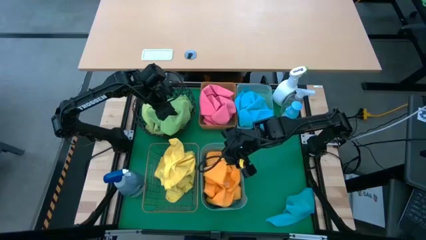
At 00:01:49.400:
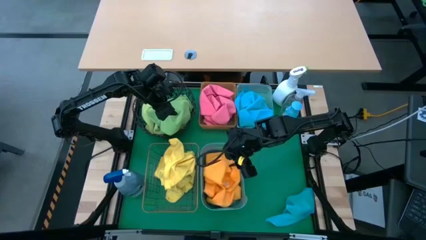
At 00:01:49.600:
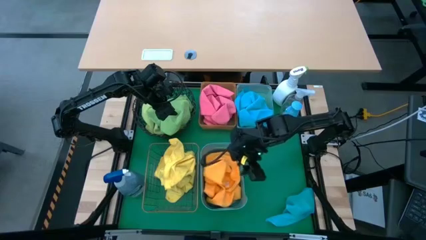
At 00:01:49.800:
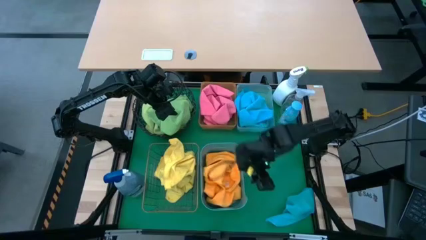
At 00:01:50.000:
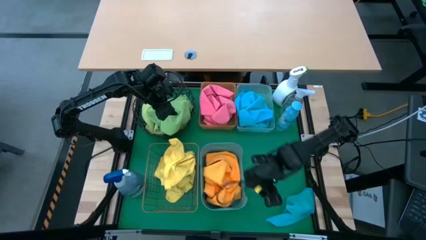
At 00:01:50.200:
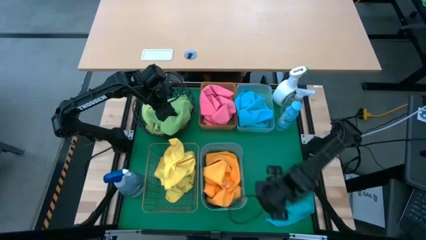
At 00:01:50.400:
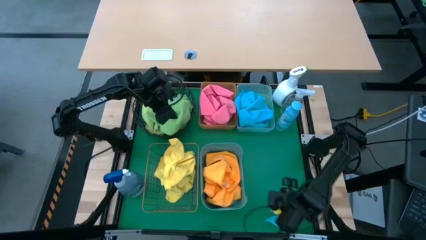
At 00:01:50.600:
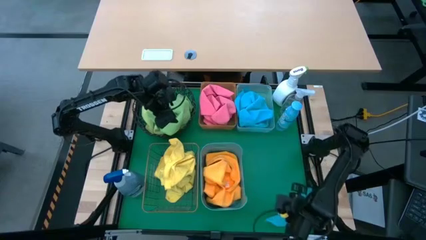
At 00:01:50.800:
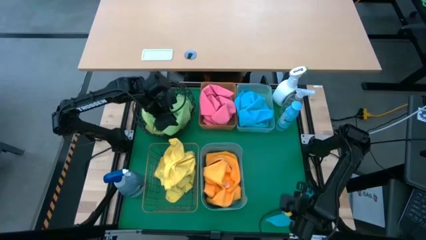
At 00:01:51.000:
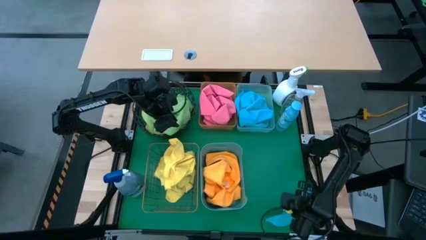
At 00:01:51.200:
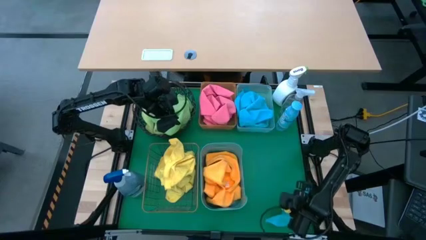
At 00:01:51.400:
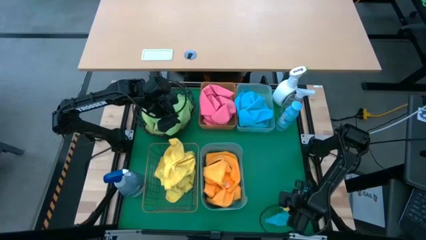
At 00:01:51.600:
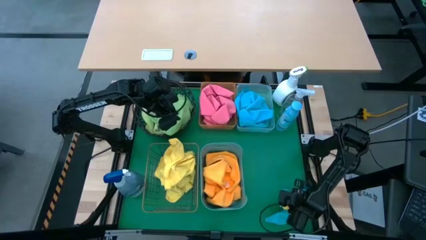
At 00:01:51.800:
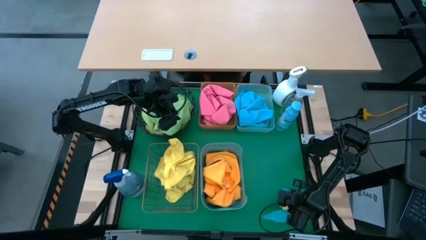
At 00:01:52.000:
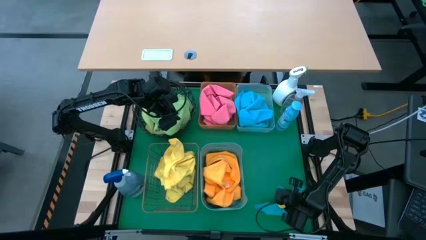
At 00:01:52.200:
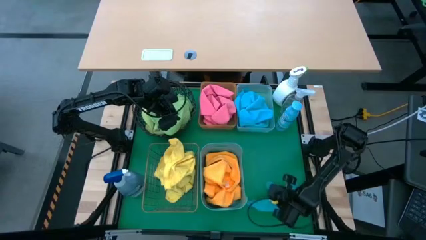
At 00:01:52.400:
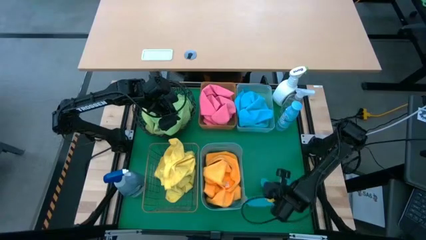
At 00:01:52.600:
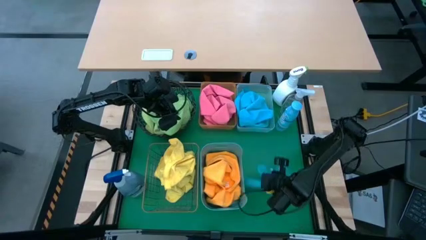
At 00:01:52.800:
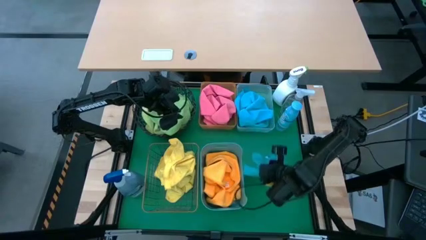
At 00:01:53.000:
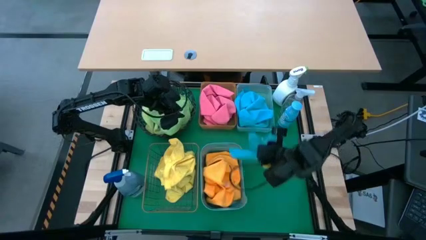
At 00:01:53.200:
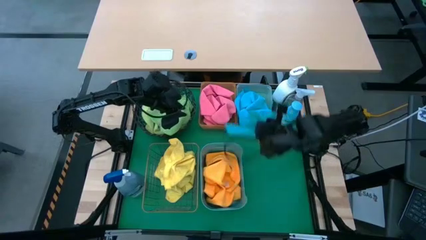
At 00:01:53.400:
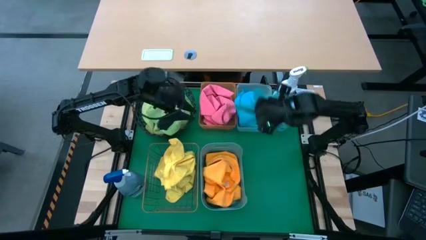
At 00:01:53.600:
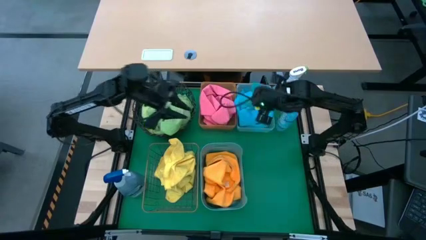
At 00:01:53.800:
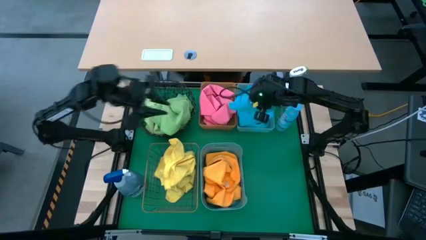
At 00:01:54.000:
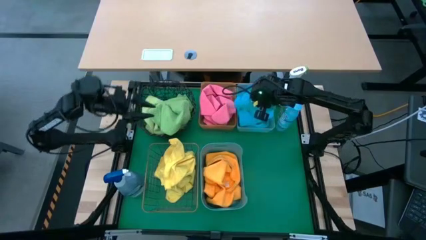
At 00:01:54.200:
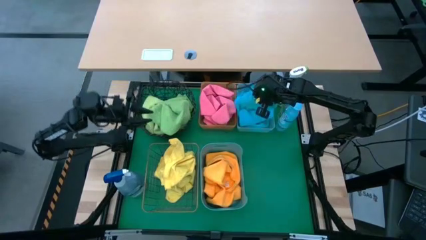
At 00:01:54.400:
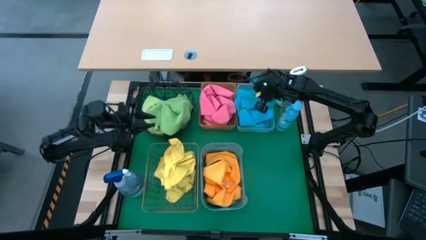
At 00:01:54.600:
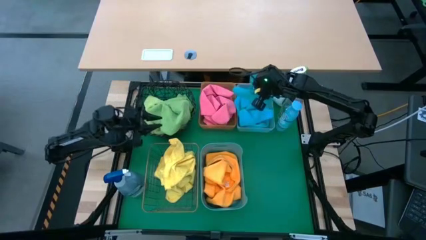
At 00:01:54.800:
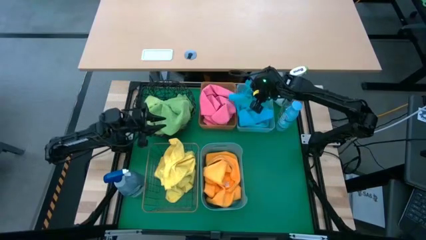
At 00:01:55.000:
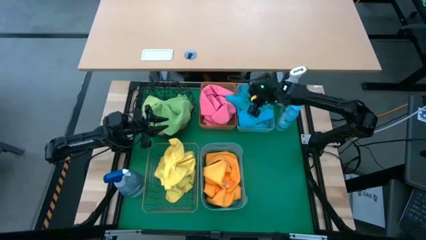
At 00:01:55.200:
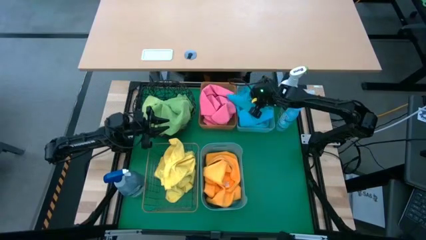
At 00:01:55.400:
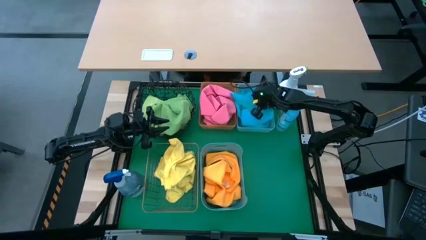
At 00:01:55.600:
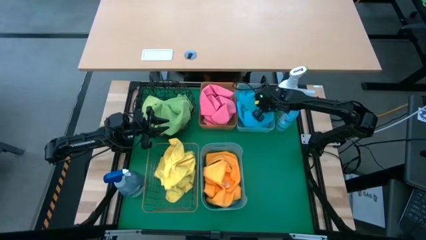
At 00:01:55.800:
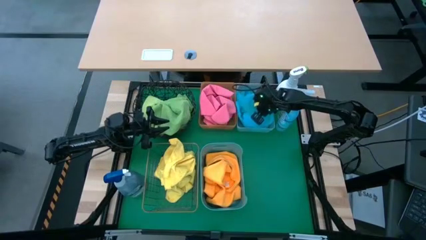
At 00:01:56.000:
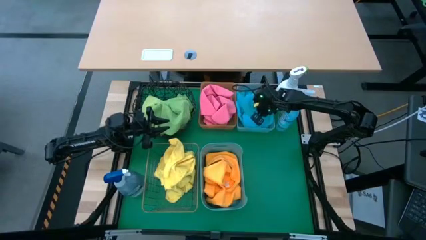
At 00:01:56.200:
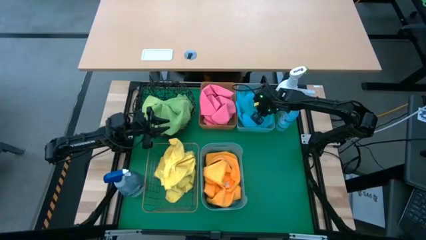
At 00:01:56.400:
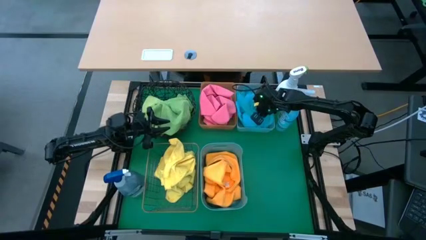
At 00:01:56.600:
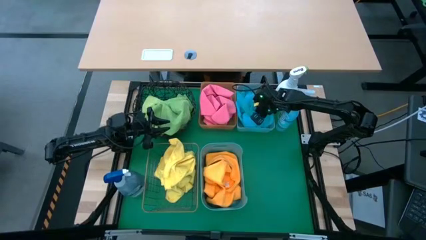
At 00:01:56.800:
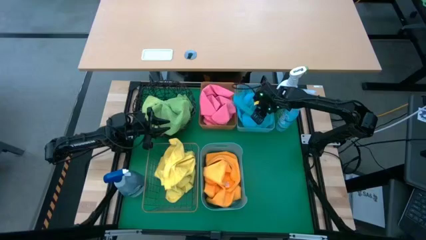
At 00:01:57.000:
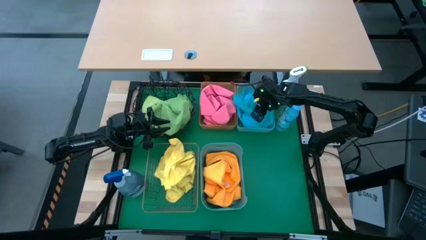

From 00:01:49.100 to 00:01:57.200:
Task: Sort microfiber towel by color & place in baskets
Put the blue towel into the transparent bin

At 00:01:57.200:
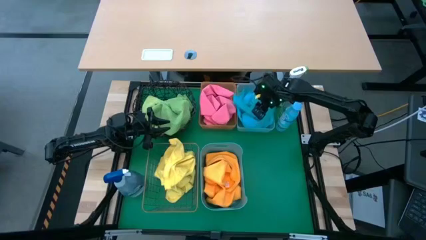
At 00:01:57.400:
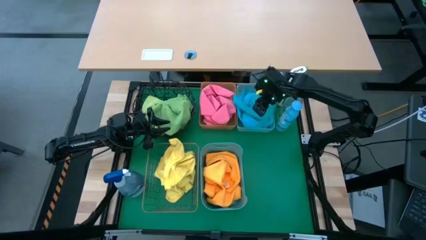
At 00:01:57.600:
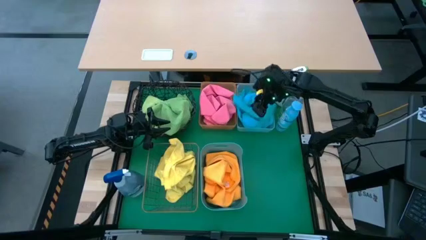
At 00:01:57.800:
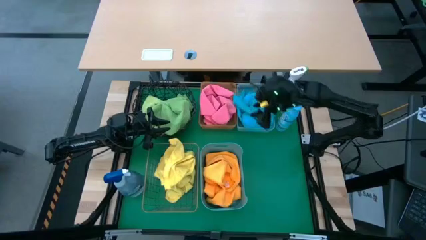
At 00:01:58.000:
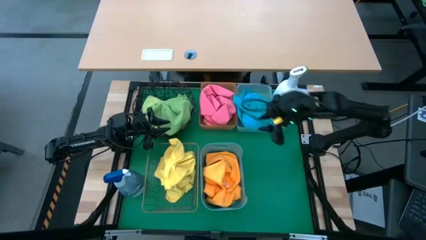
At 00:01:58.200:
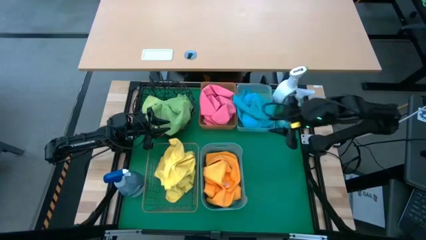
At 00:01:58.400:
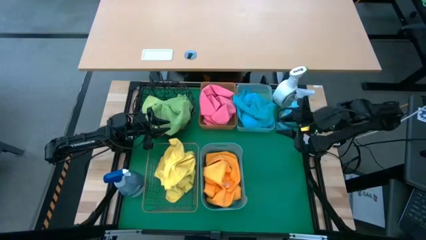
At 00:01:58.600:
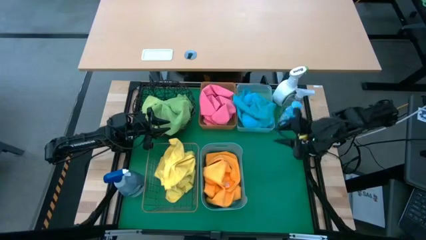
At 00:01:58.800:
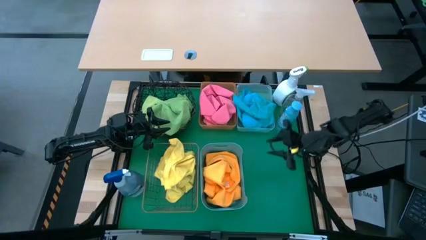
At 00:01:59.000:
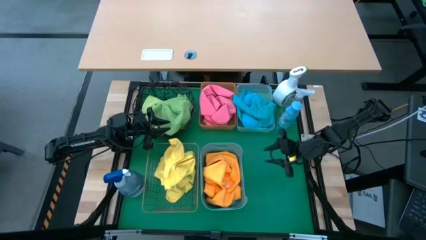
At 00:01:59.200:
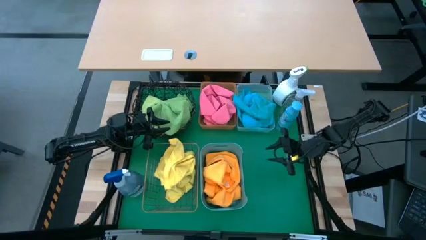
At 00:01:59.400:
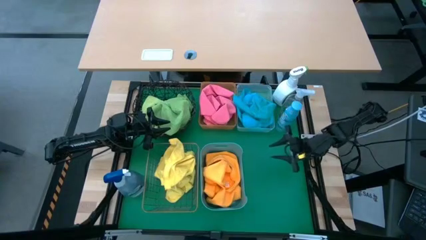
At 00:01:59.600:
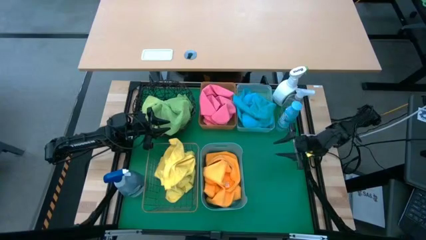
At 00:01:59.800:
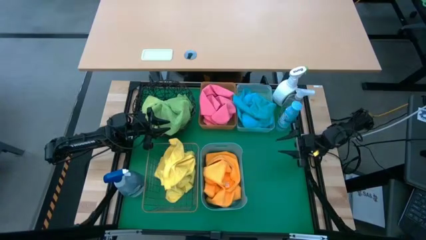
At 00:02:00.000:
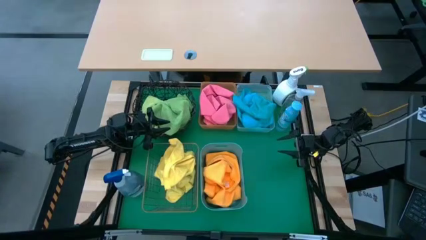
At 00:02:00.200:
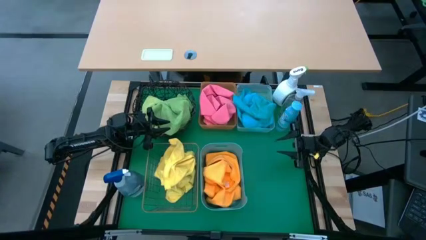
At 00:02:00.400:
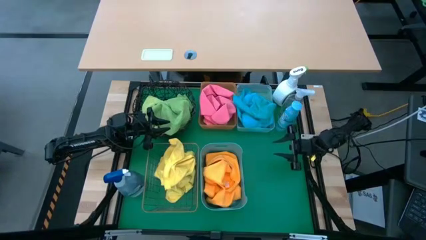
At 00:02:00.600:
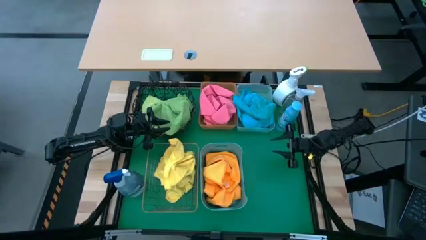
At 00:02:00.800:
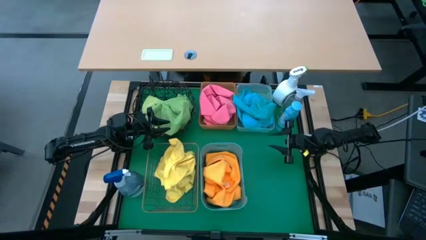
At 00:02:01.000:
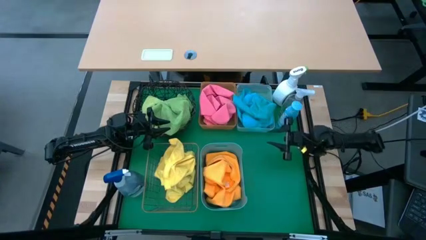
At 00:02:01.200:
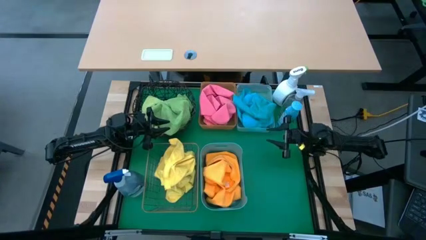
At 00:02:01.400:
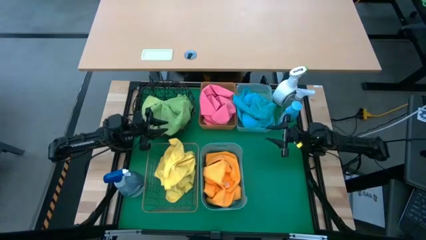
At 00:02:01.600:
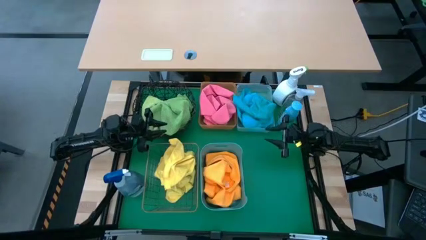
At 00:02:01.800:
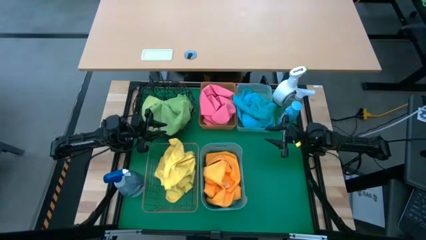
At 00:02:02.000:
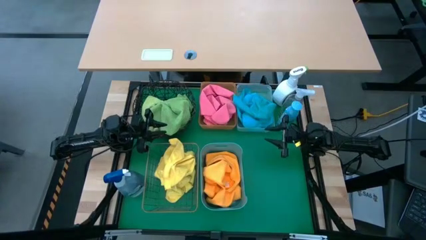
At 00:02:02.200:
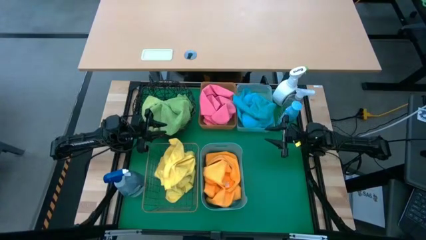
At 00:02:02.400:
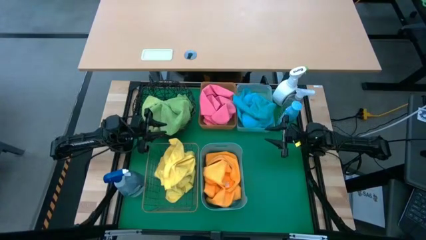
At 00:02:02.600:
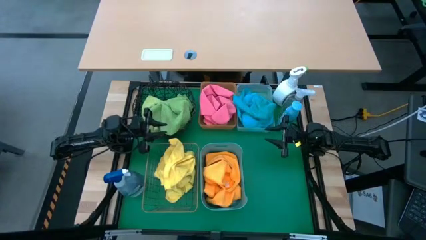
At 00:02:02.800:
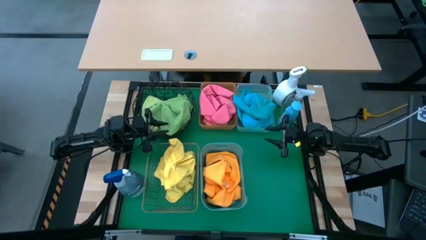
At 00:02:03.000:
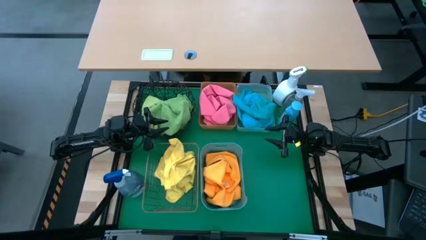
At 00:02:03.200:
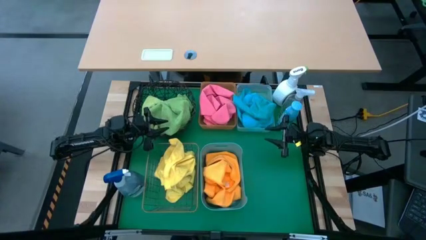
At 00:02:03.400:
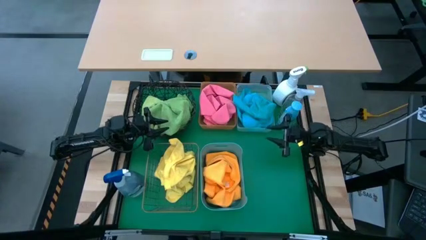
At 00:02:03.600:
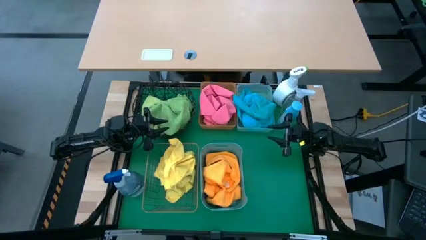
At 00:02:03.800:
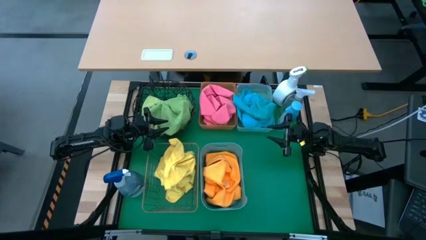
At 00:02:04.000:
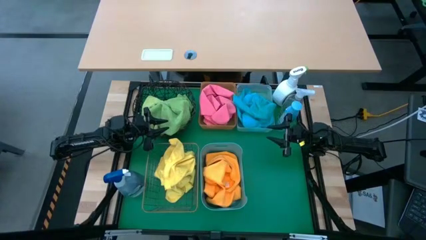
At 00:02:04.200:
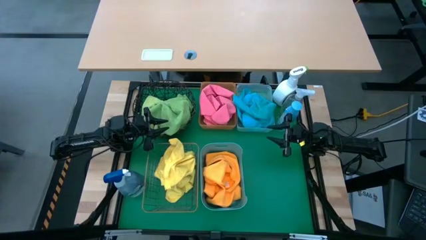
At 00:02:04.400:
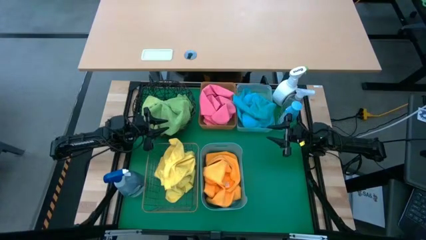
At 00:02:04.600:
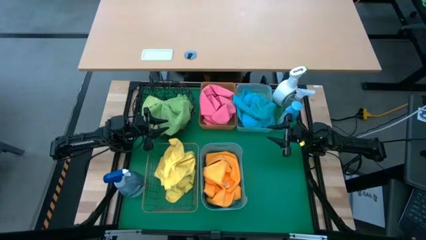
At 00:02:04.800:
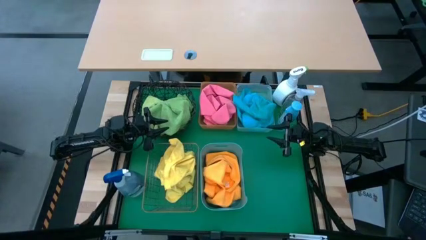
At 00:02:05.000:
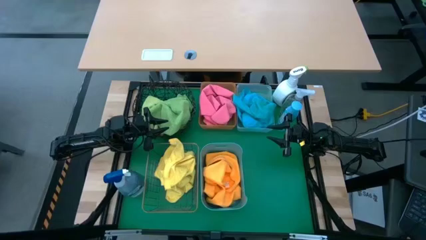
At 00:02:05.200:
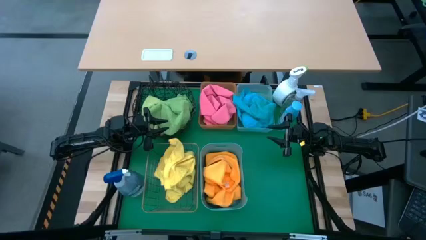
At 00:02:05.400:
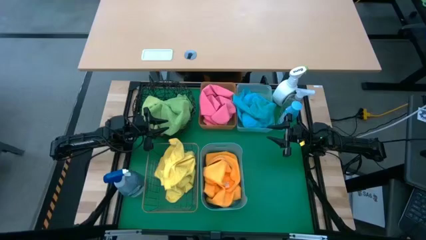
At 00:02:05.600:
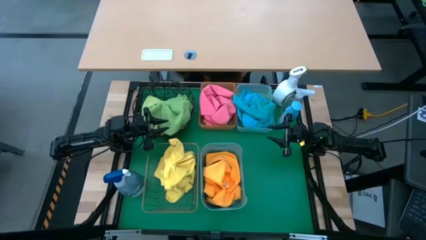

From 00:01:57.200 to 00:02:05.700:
Return to Home Position
